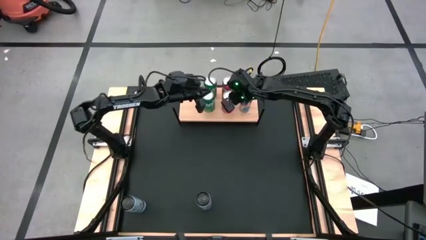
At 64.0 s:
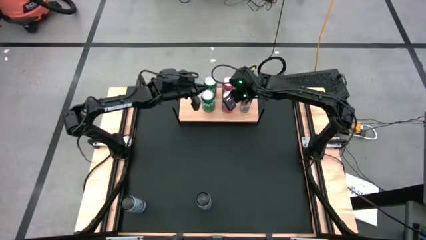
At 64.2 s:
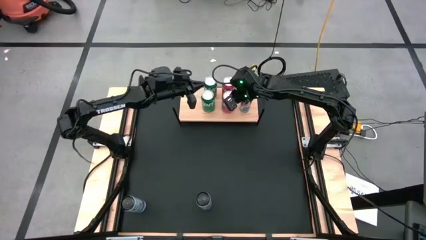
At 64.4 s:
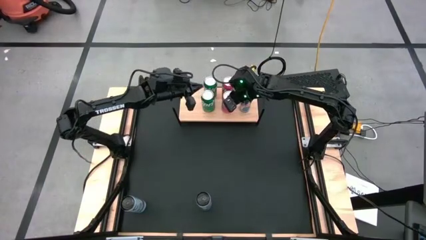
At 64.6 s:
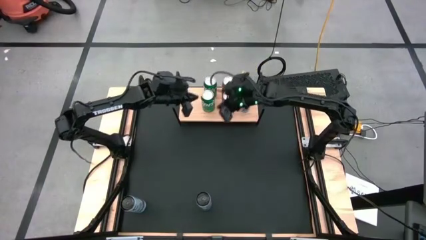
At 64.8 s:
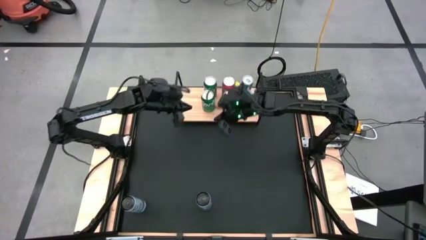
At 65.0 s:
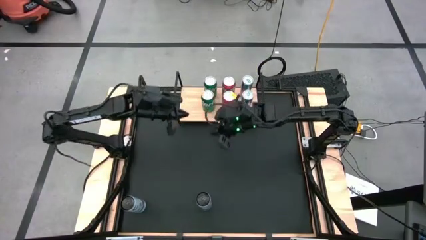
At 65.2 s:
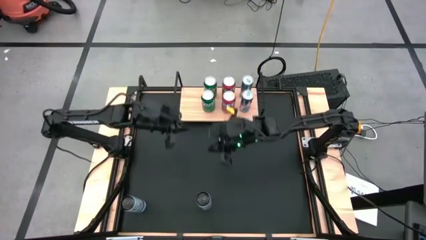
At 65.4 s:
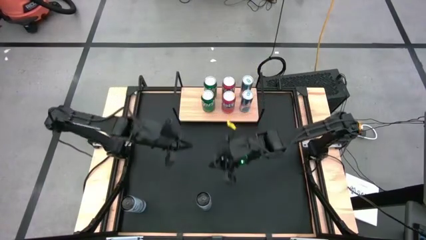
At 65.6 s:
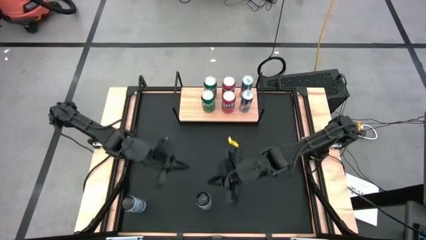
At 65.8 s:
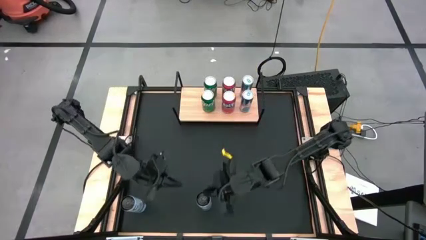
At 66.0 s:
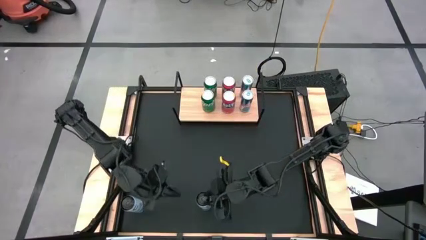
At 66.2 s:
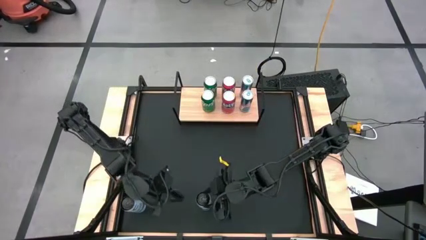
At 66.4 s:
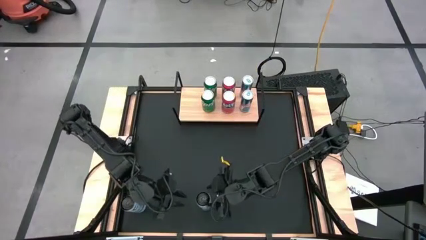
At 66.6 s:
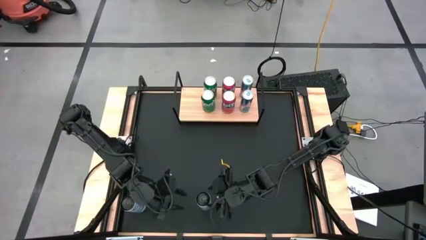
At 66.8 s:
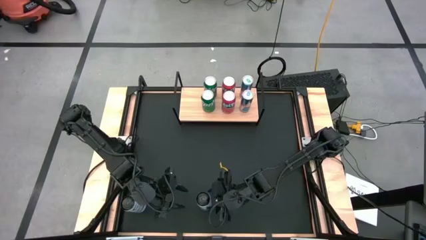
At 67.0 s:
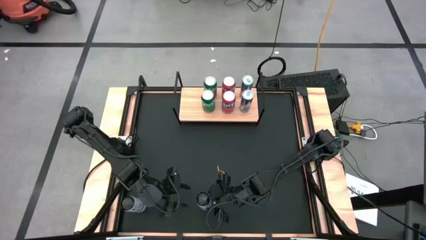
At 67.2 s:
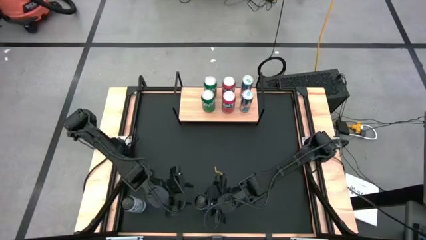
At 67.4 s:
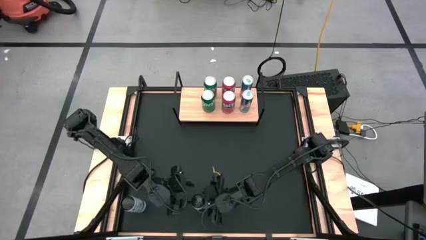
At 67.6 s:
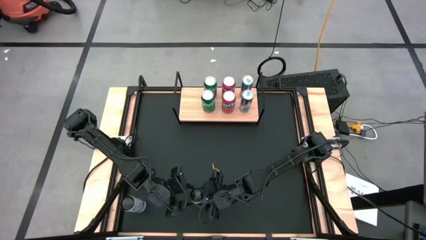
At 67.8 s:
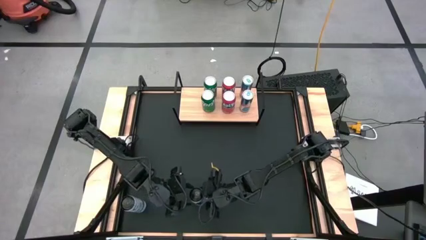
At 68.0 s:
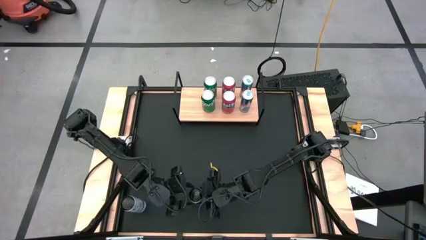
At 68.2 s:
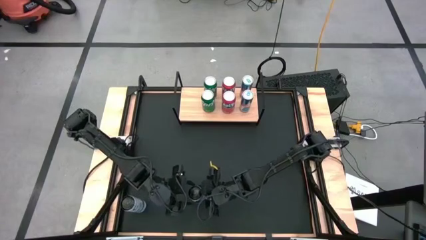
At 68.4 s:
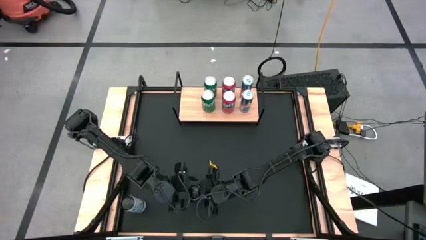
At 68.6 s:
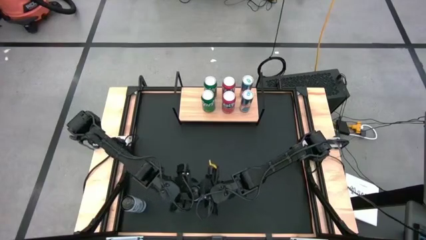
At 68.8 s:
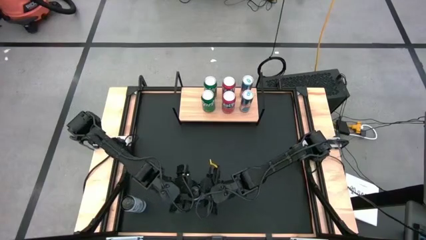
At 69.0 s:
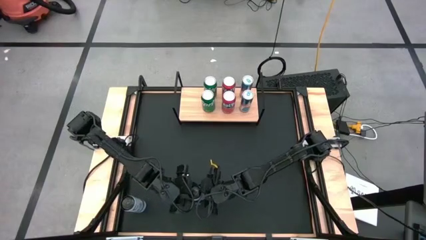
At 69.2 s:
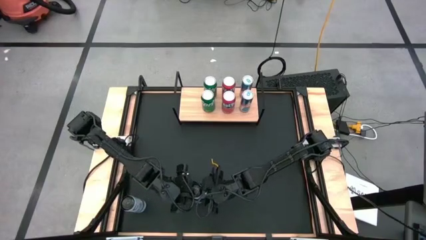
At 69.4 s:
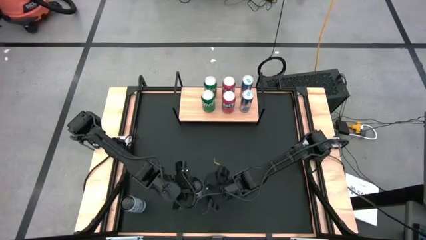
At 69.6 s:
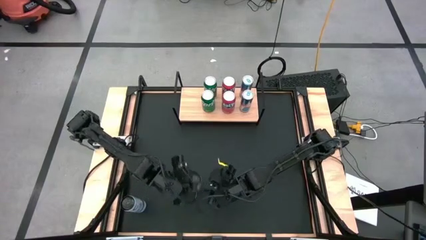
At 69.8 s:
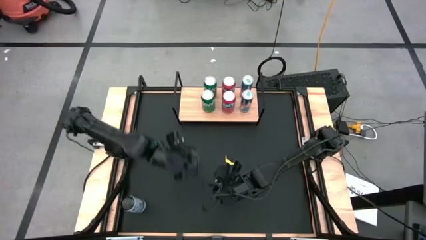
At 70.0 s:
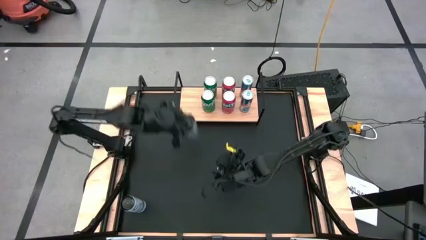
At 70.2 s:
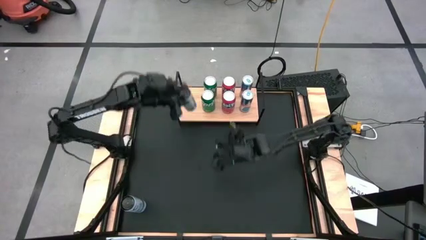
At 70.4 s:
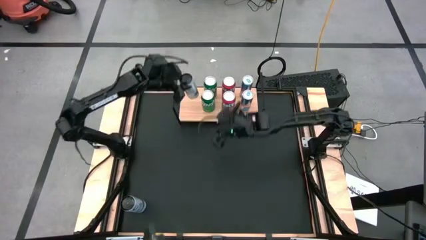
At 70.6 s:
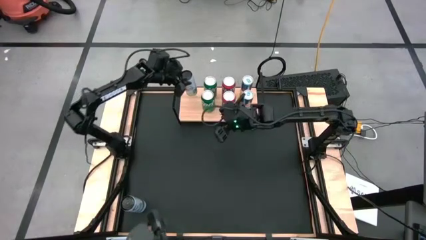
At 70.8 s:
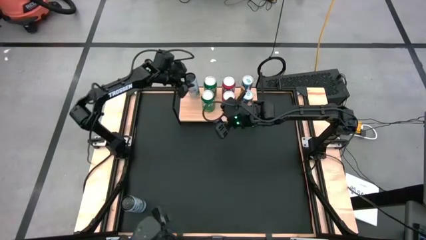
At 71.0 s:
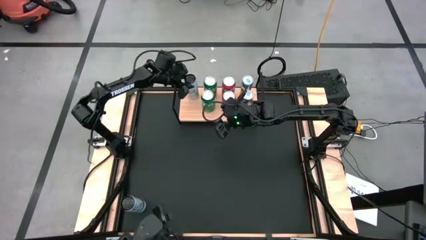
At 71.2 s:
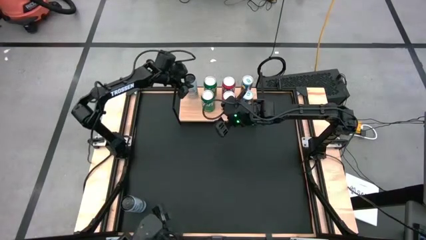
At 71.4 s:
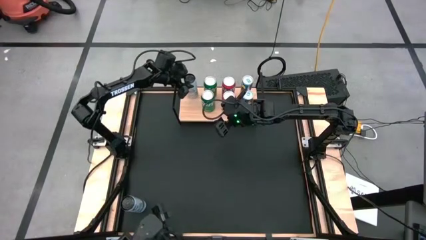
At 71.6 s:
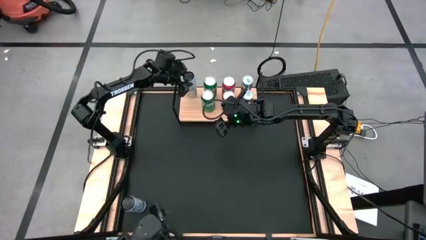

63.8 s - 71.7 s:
Task: Place canned beverage on shelf
Put the right white soda can on the shelf

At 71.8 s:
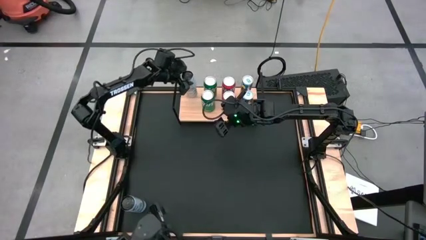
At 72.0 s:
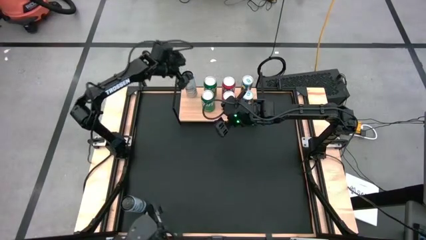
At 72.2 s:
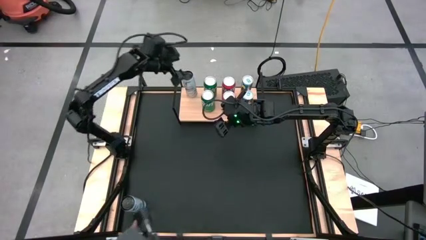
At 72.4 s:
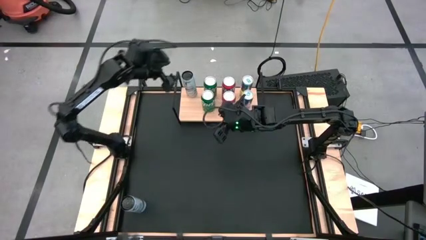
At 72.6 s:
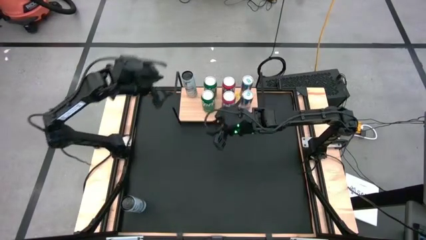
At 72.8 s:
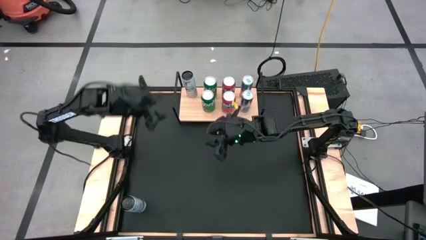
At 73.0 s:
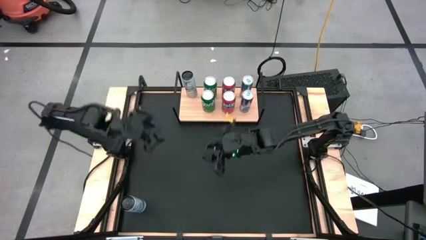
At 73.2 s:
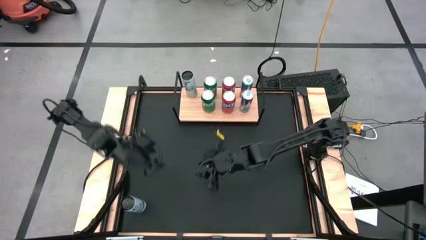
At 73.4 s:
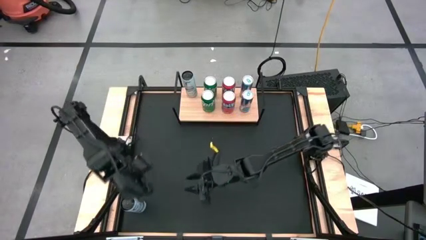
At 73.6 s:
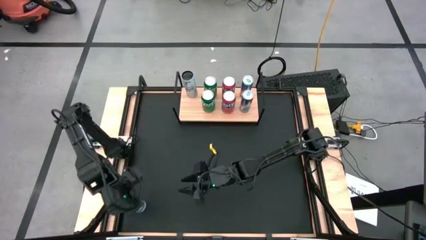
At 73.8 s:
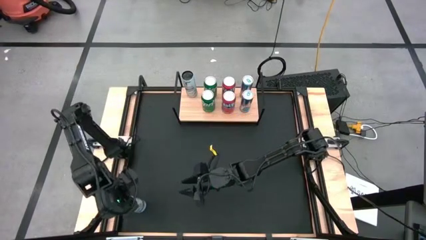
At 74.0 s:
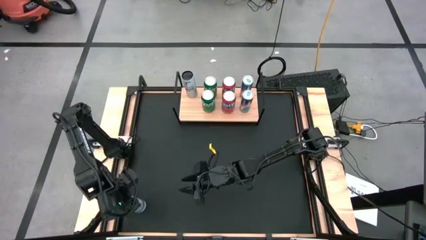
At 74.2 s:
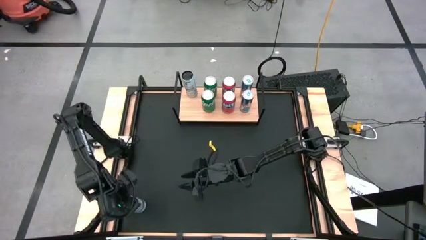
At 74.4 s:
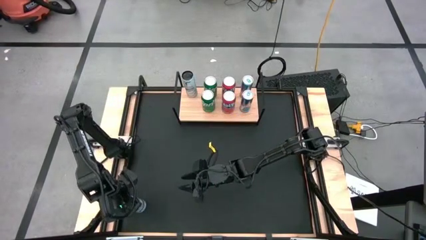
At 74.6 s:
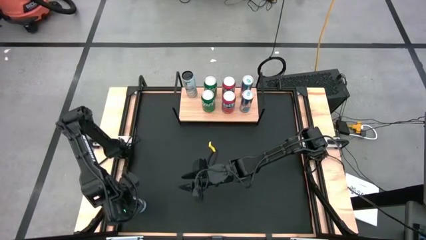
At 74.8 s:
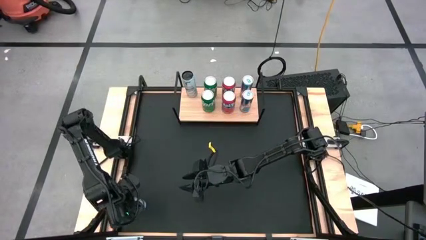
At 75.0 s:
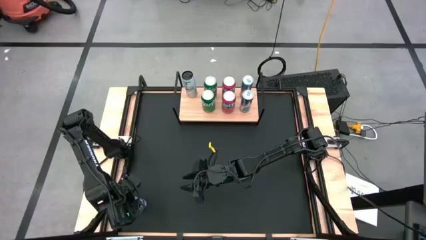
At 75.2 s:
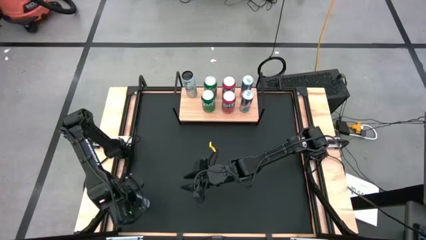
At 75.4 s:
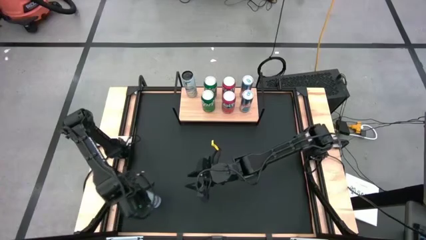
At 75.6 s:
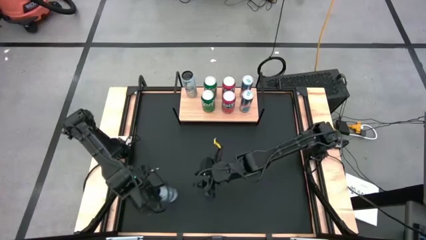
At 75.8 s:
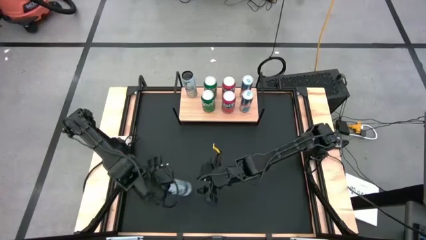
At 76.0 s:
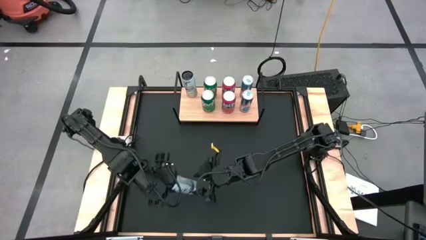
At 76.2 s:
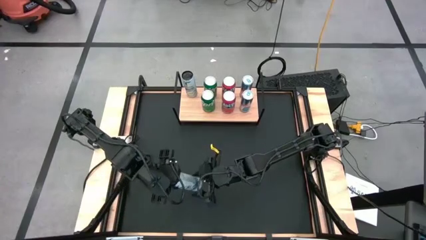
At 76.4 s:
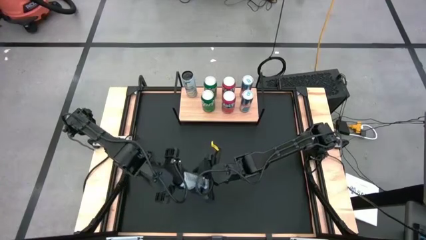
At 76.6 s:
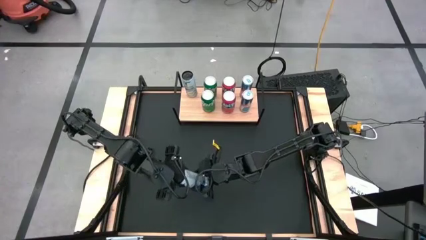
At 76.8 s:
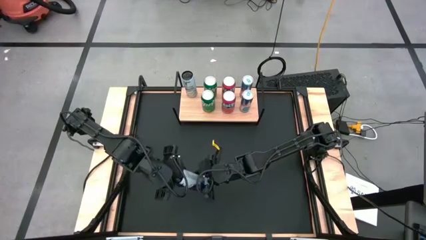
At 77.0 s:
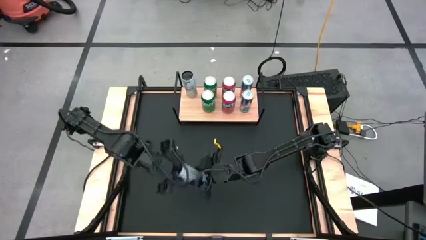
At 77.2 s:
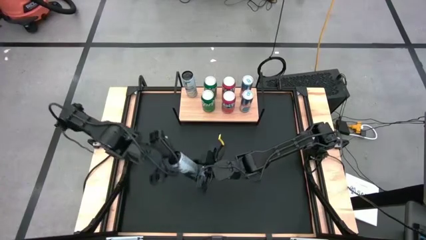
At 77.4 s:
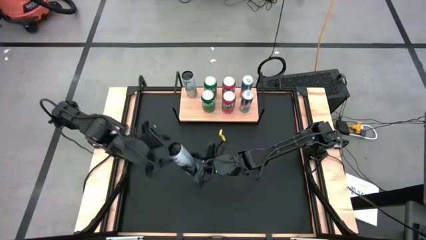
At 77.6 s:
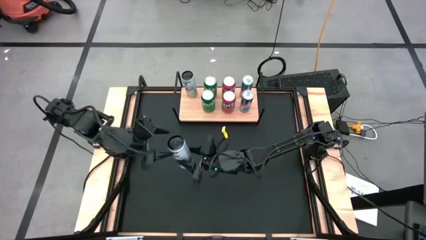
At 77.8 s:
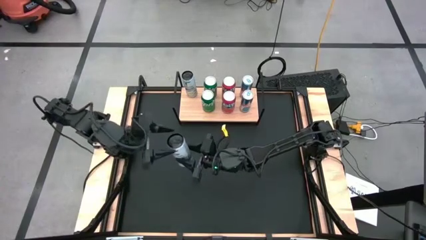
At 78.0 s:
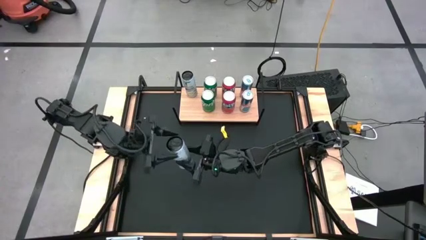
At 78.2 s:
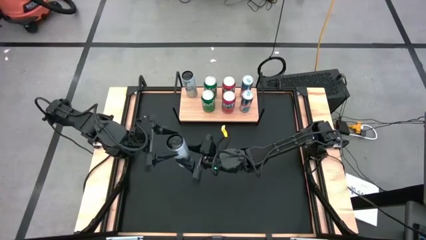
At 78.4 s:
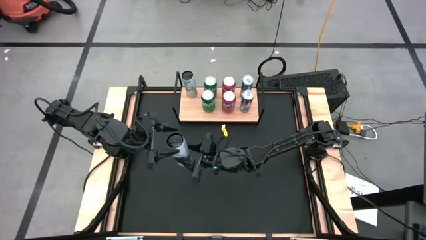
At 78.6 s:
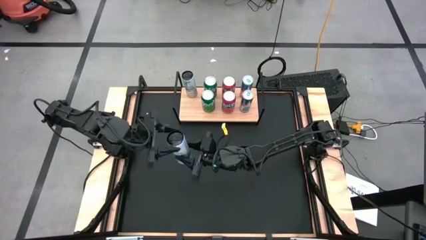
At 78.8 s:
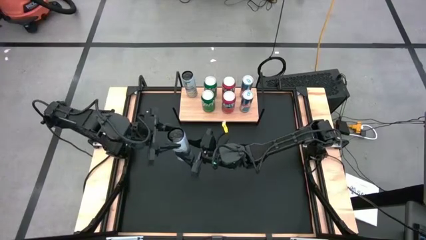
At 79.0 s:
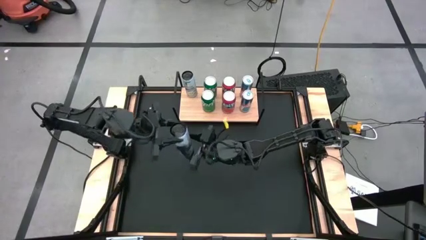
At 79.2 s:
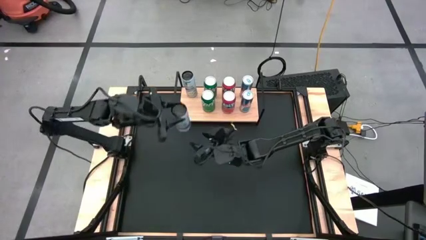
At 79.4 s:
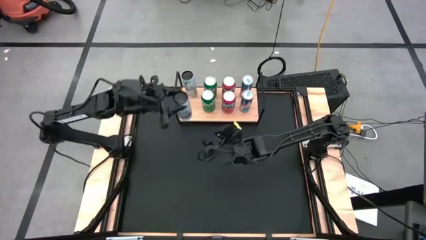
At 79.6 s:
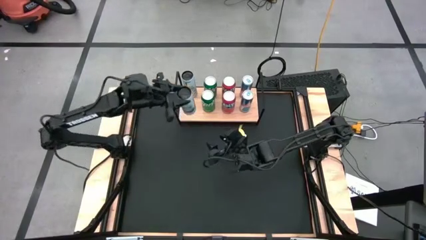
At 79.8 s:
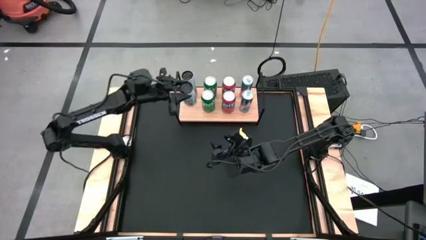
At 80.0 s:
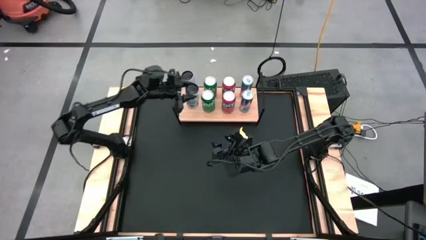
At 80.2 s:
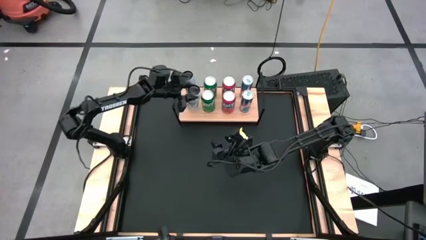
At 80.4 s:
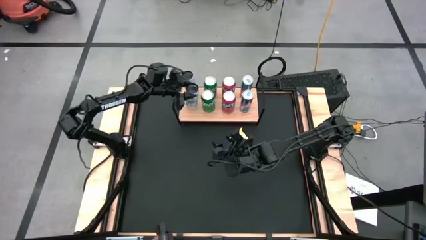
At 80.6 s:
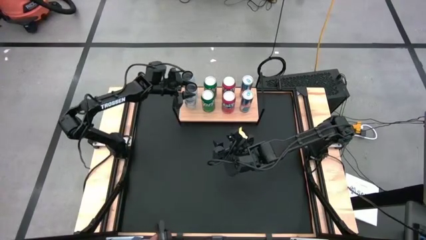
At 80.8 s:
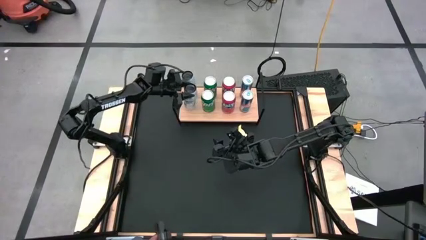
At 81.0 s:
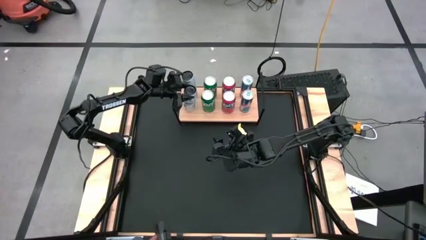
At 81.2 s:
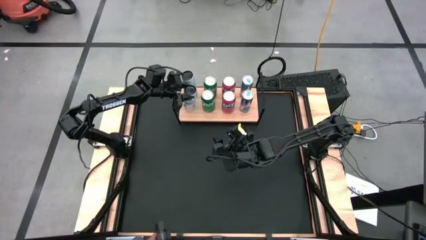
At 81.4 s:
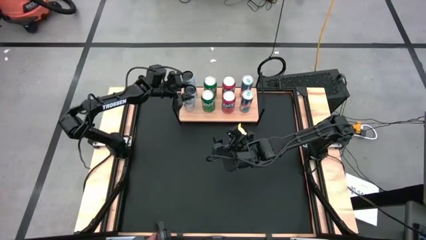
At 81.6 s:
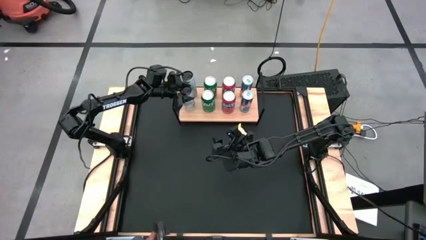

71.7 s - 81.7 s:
Put the white soda can on the shelf aligned with the other white soda can
